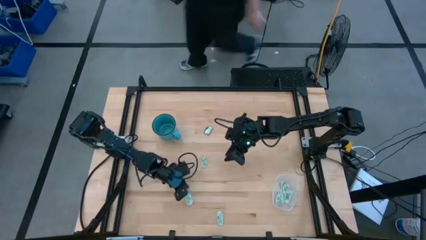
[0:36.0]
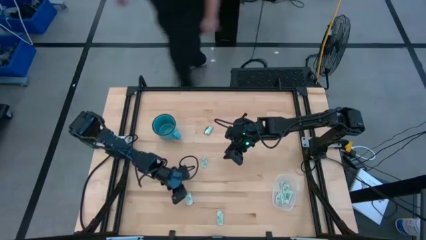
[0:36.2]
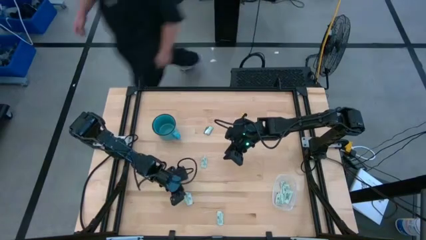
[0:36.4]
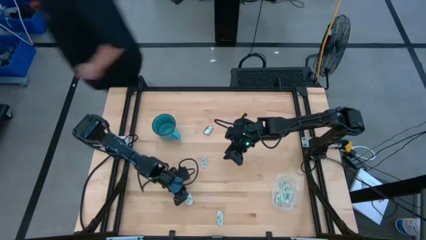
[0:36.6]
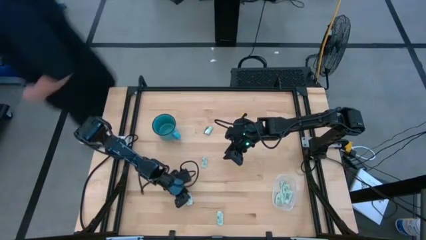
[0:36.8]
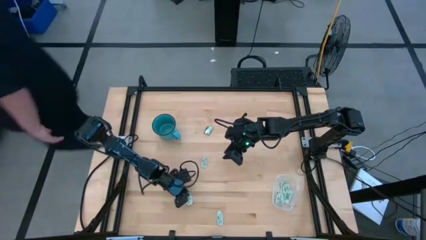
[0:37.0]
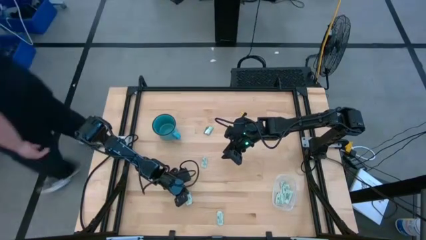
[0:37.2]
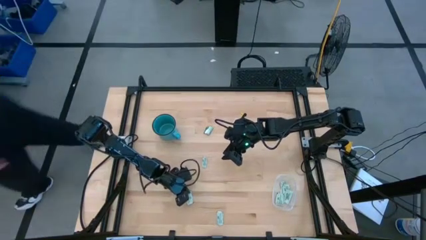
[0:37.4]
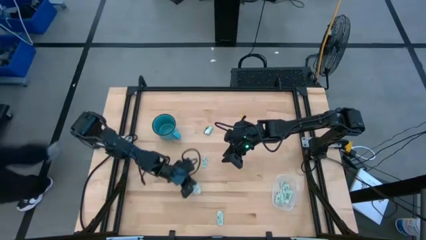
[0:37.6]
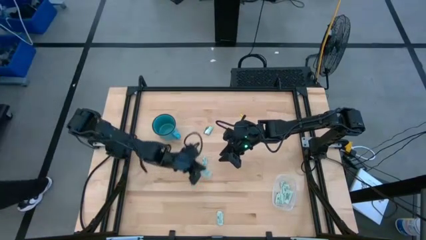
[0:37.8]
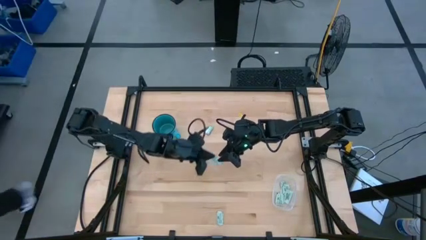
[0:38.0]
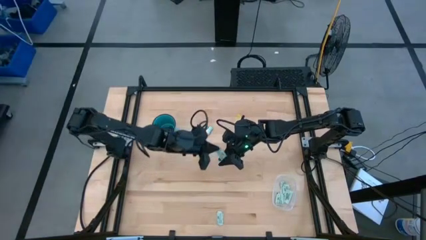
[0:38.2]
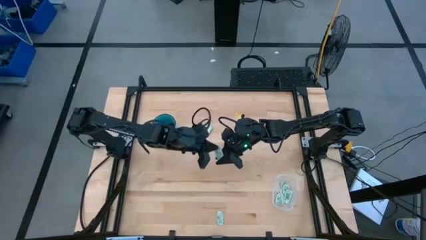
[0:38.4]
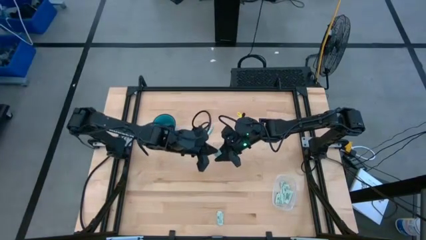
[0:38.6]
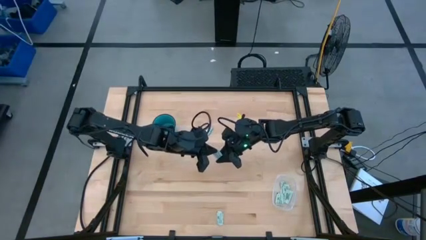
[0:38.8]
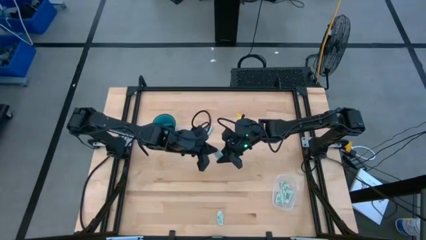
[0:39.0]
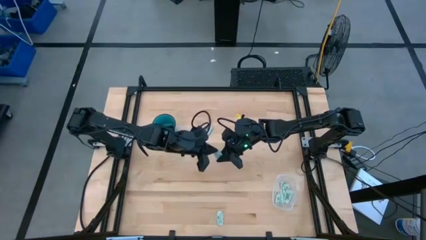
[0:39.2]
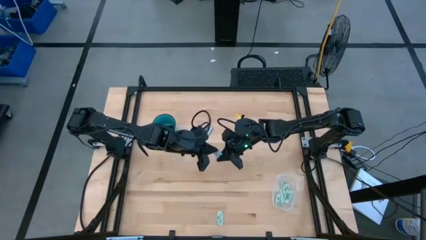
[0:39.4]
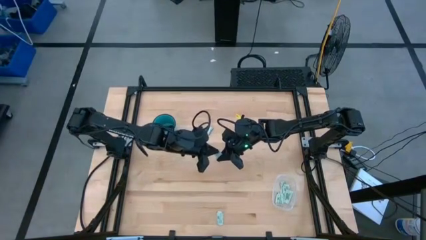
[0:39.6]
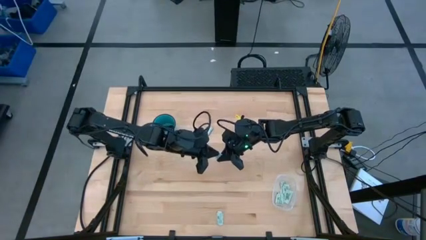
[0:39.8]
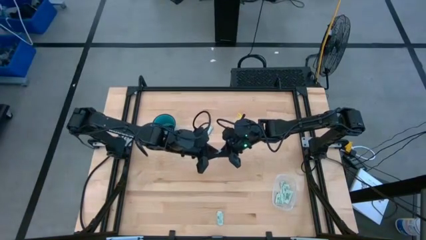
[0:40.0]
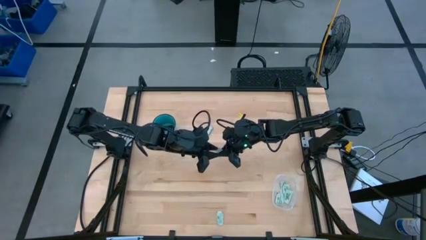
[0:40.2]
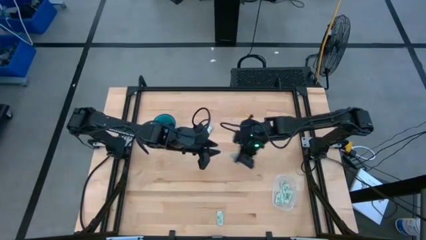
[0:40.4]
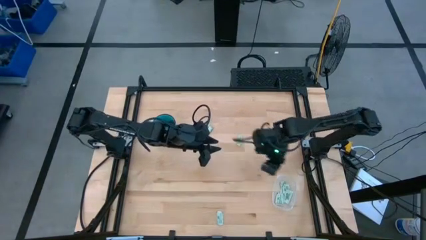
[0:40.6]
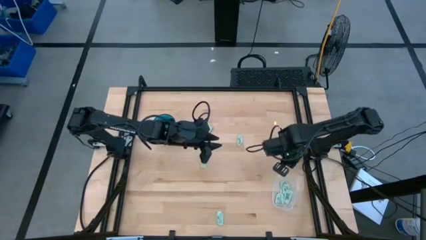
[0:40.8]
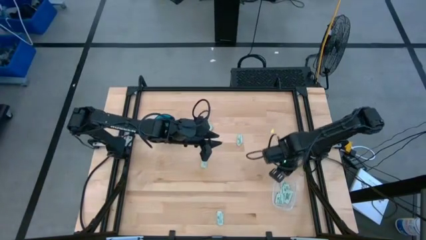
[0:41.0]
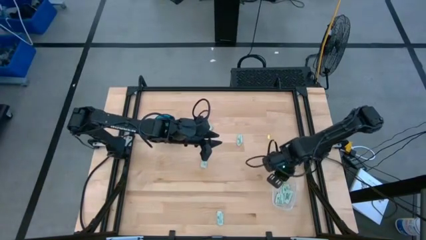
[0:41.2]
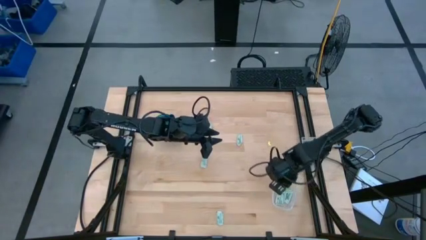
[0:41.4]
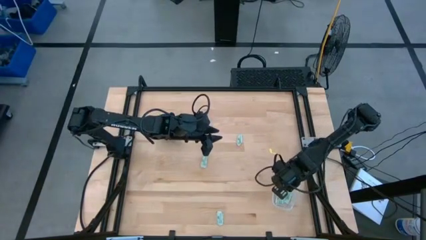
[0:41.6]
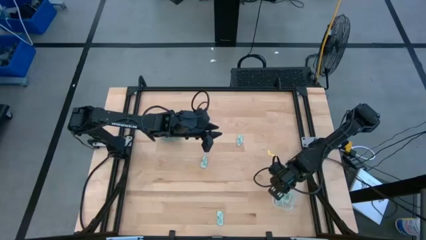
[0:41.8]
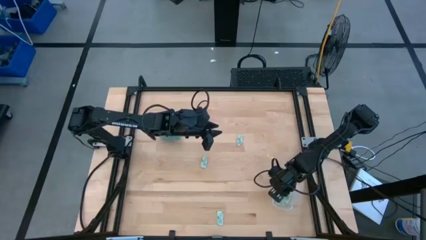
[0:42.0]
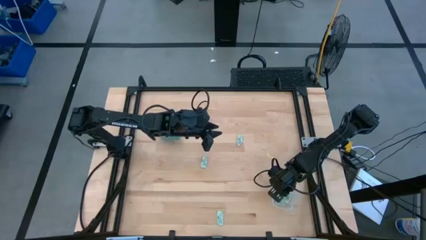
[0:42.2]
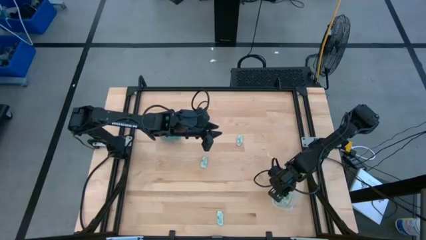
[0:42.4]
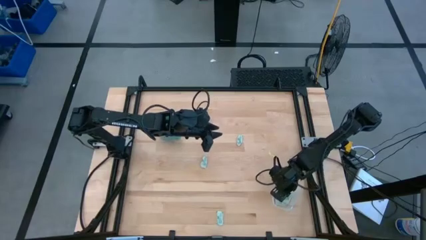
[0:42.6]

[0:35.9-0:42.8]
Task: Pick and place Stevia / Truvia into bins
Put the stevia packet into the transparent container

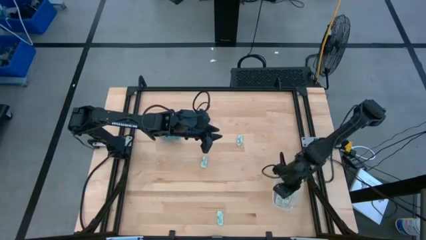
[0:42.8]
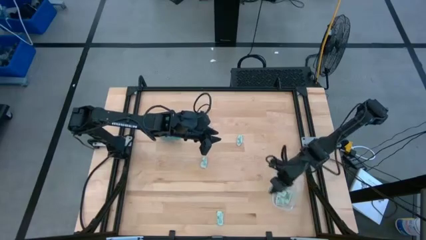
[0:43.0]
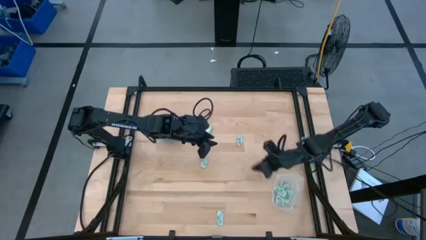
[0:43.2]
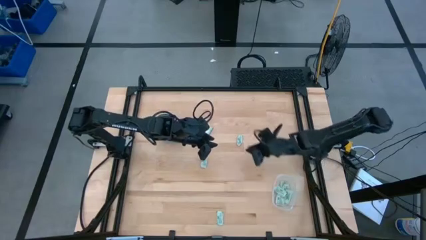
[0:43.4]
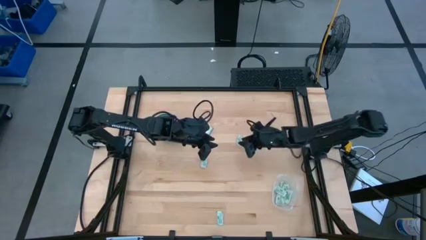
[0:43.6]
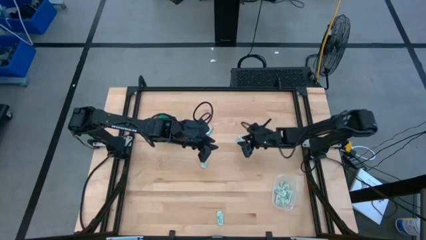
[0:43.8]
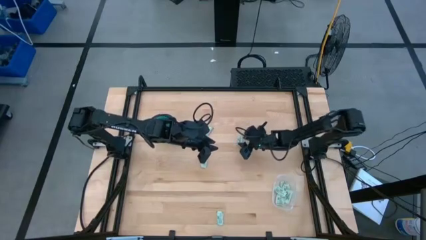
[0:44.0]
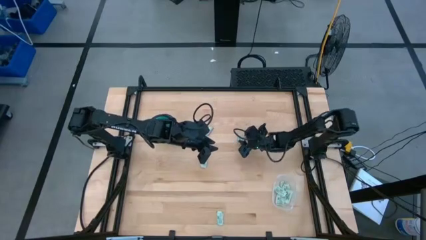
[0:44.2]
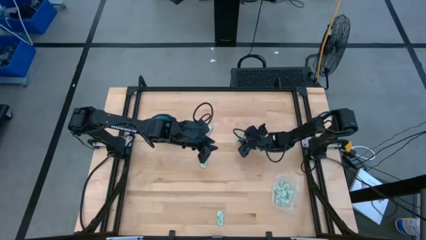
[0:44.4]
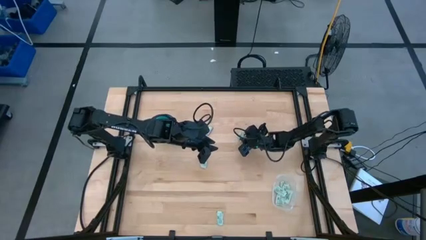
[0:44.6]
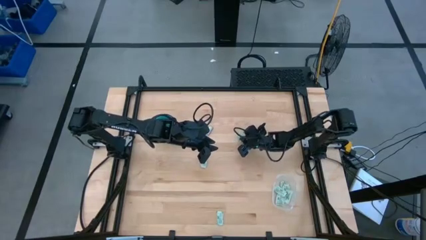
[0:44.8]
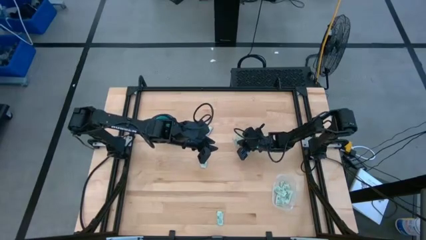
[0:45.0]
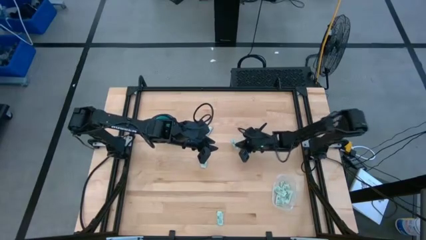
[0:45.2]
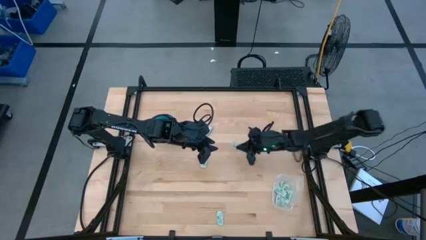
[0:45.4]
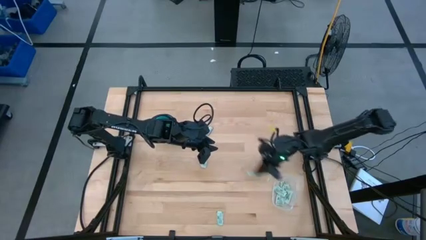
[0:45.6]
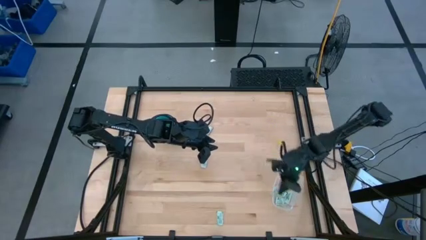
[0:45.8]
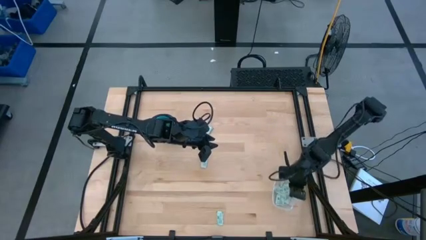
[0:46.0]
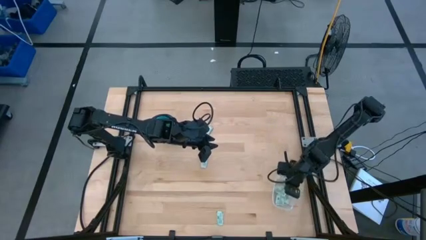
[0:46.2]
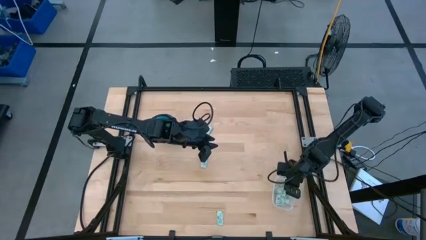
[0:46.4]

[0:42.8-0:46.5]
Put the stevia packet into the transparent container

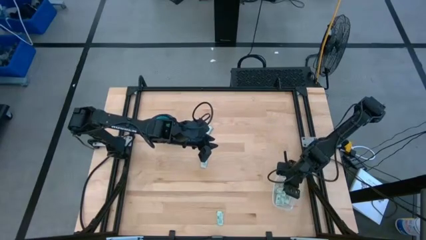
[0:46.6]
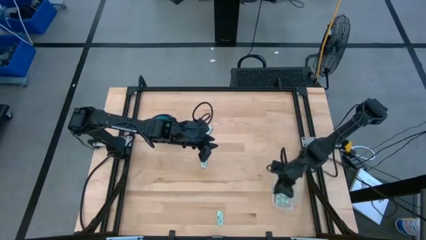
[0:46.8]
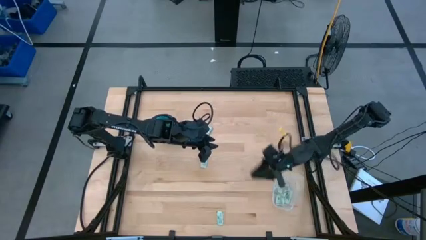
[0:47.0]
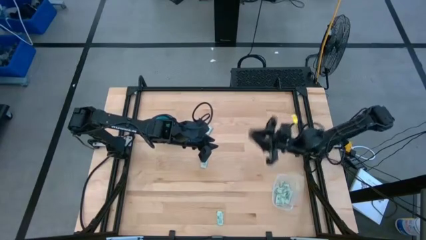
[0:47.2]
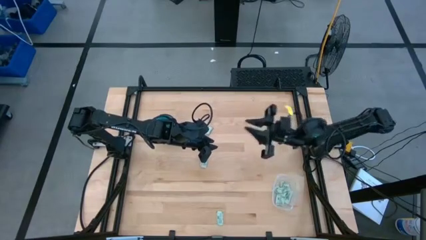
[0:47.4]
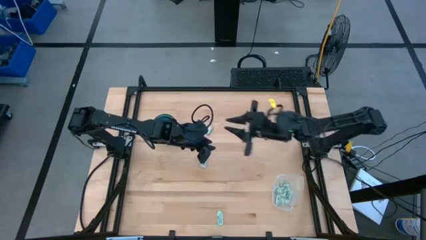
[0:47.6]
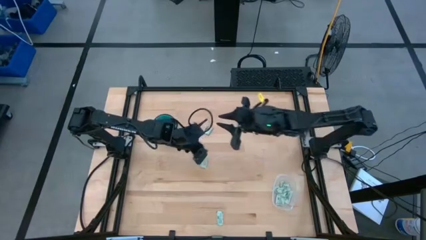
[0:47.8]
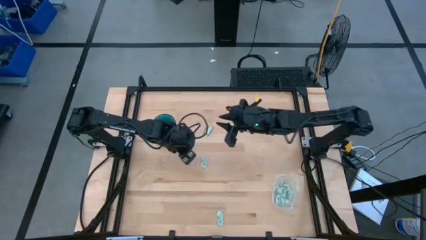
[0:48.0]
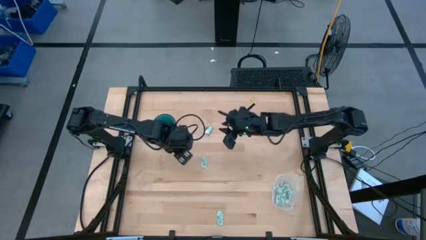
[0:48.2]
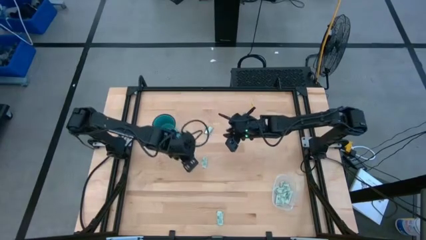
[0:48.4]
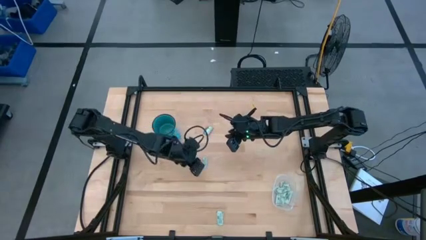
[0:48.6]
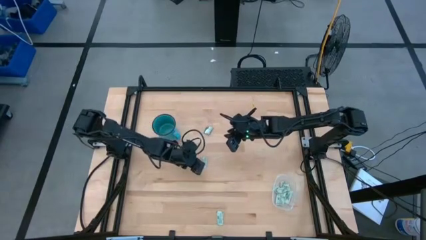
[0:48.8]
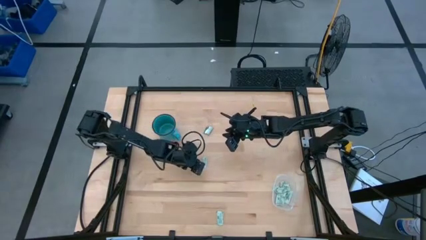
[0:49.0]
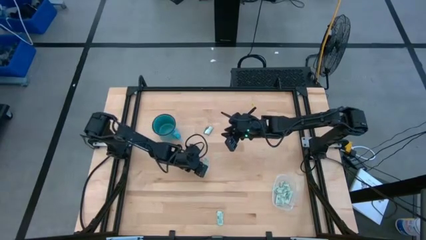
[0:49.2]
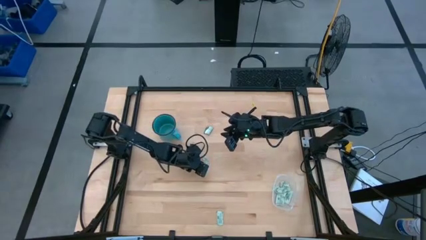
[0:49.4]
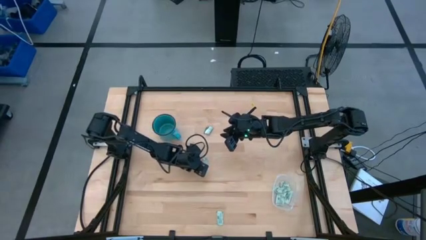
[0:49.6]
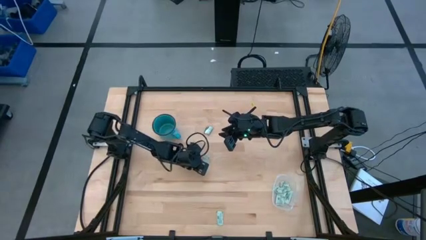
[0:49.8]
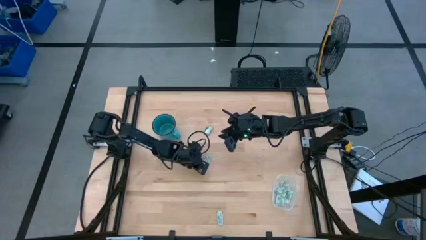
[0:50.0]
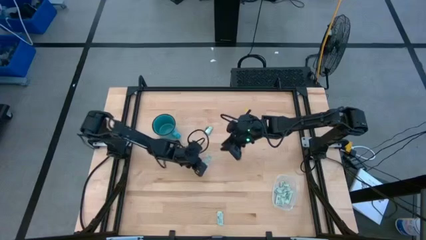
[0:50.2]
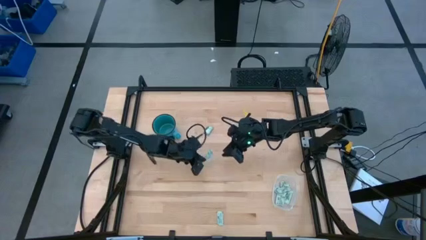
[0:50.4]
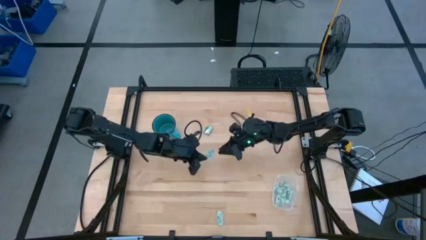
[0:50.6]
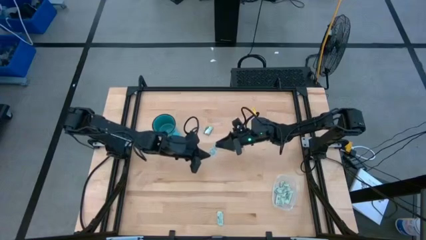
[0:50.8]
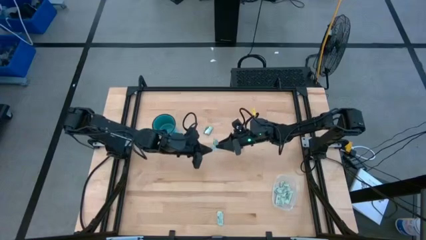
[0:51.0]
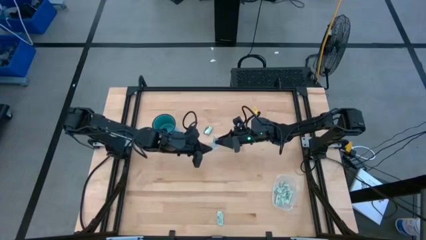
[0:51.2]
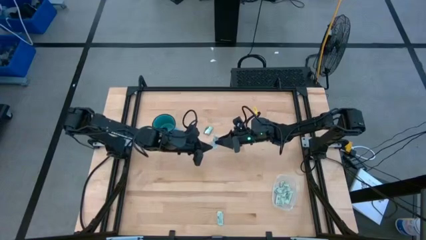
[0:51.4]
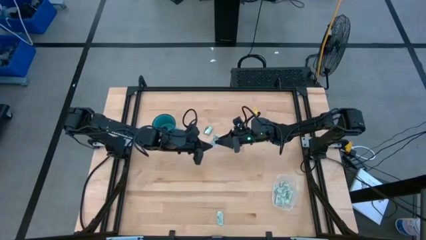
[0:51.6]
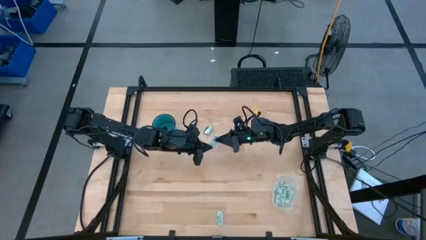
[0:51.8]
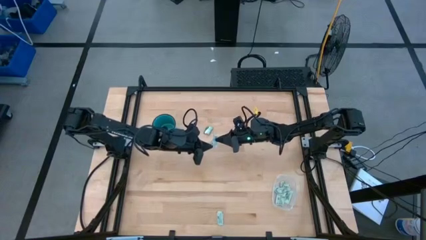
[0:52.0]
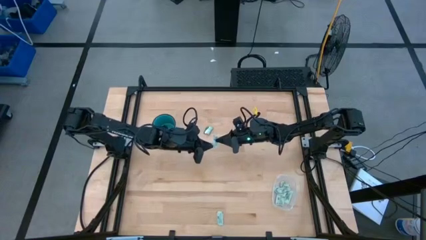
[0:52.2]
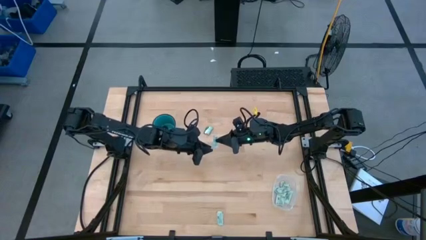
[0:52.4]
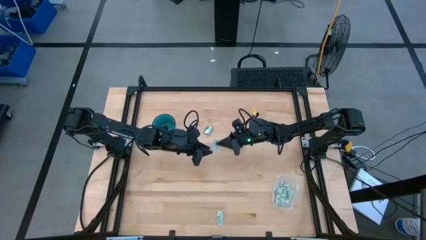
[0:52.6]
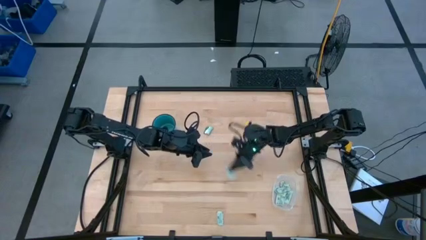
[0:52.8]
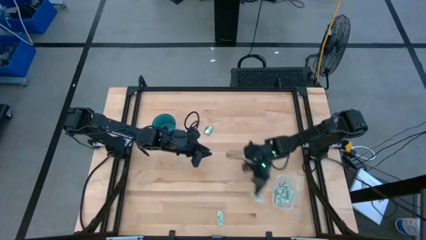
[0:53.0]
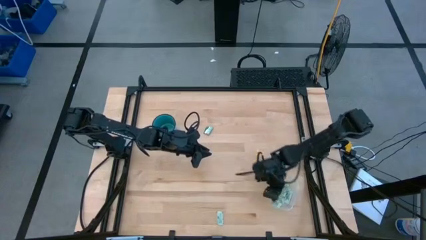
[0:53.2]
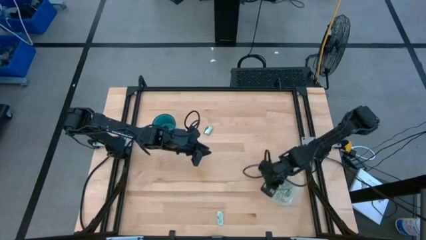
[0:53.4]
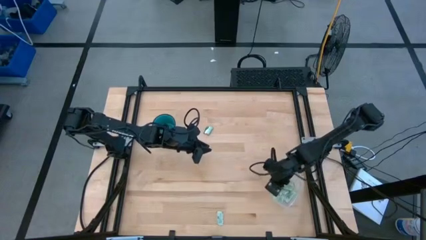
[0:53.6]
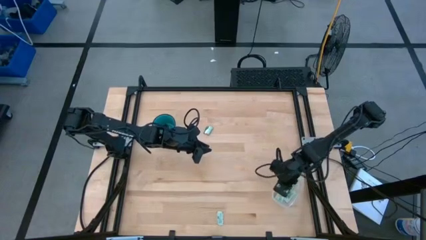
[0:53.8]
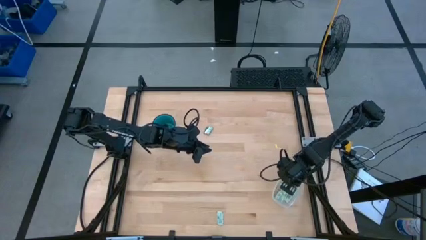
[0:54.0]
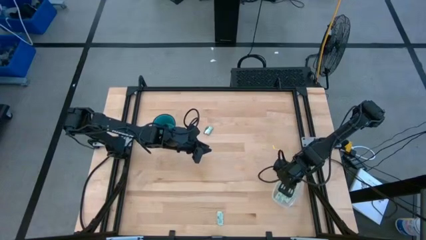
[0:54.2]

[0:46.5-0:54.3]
Put the stevia packet into the transparent container
